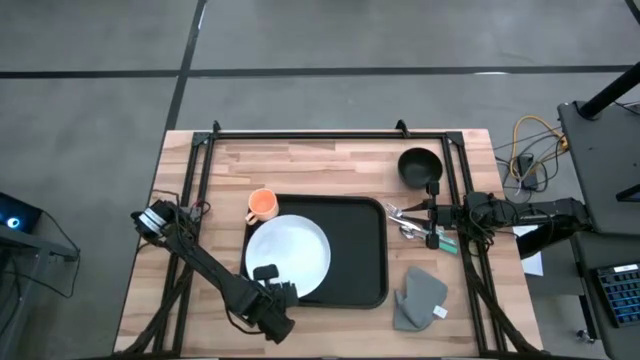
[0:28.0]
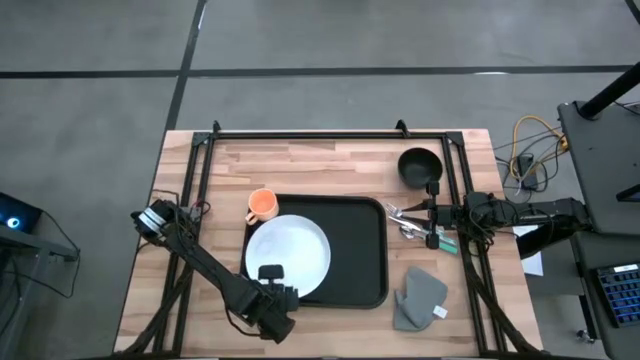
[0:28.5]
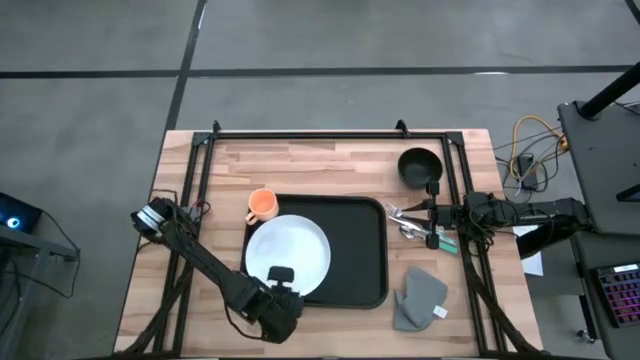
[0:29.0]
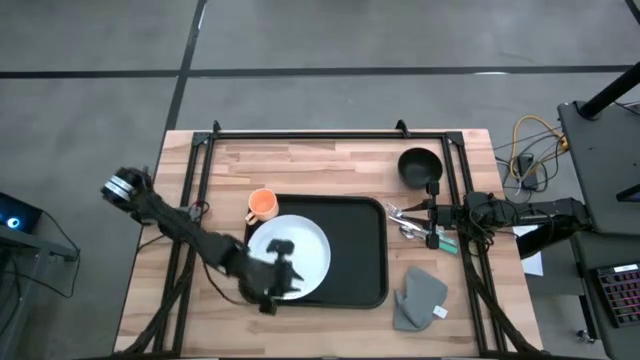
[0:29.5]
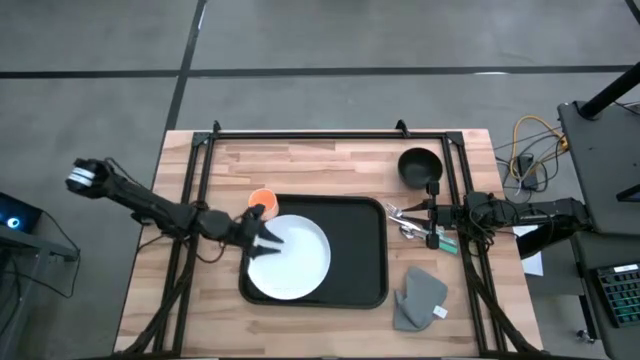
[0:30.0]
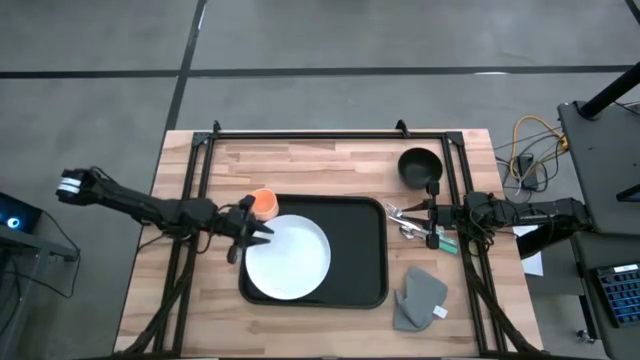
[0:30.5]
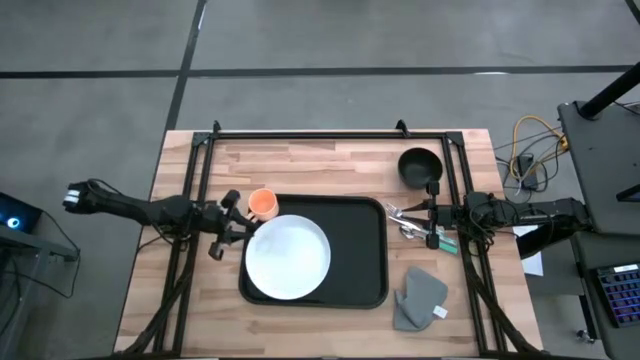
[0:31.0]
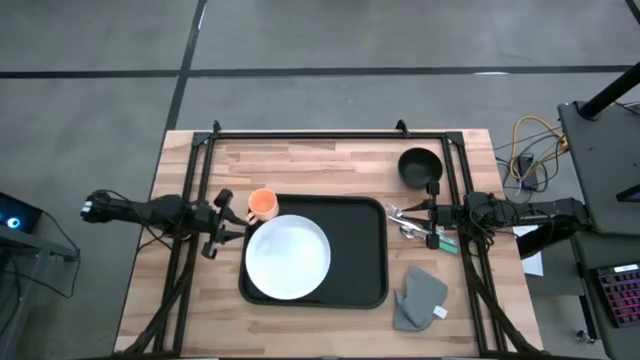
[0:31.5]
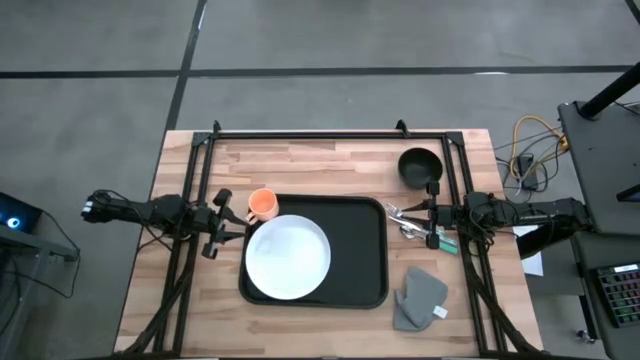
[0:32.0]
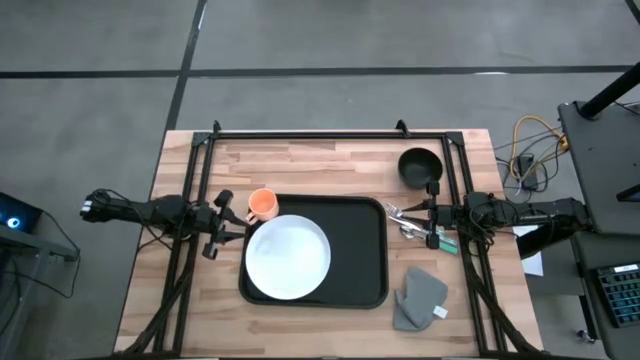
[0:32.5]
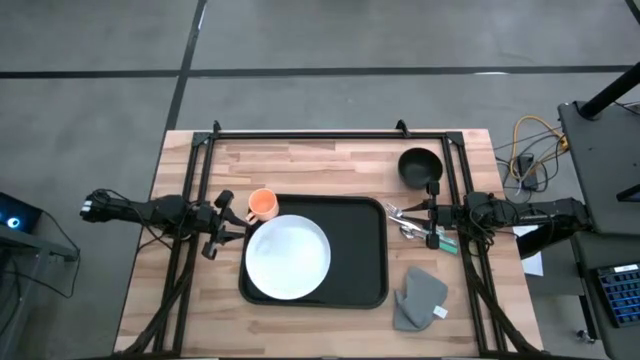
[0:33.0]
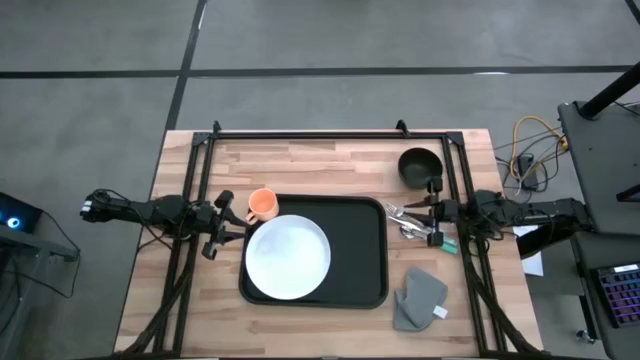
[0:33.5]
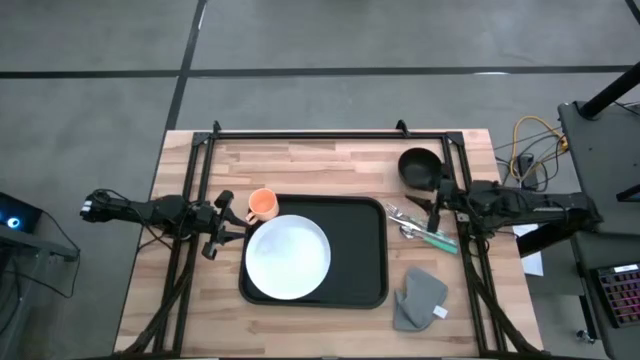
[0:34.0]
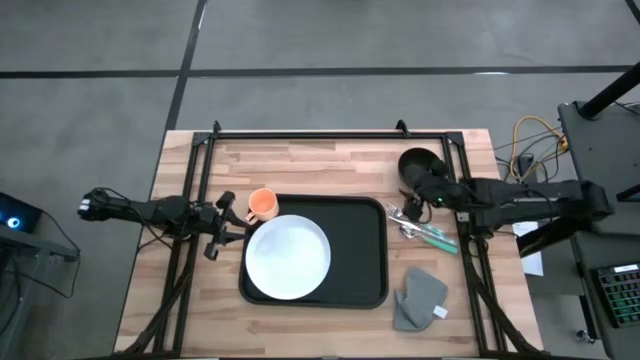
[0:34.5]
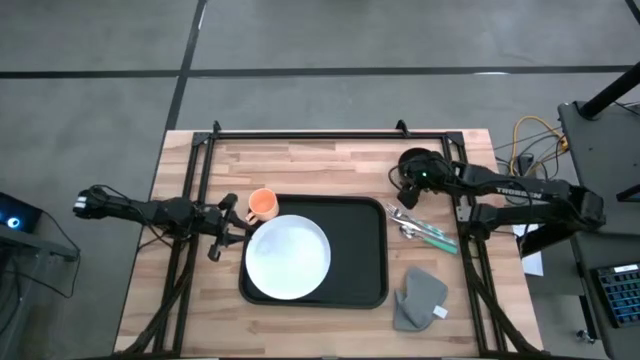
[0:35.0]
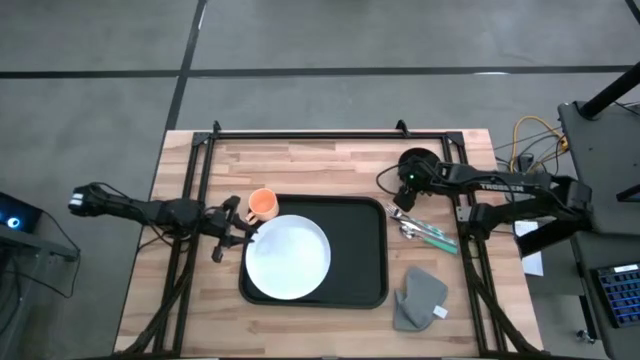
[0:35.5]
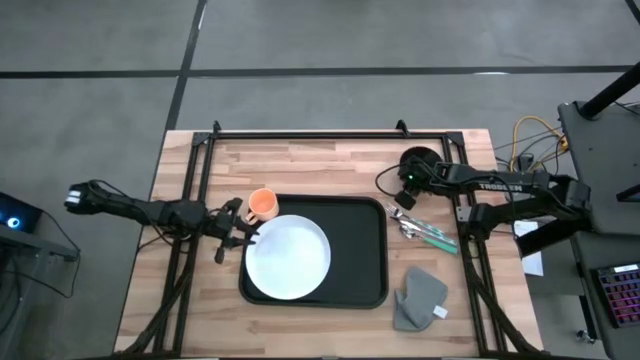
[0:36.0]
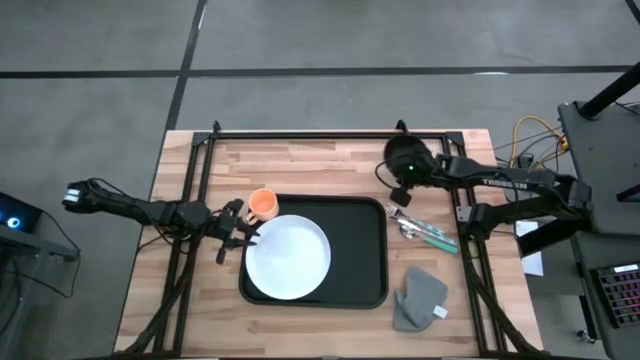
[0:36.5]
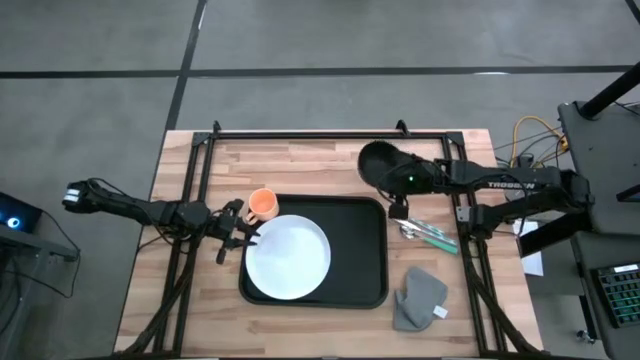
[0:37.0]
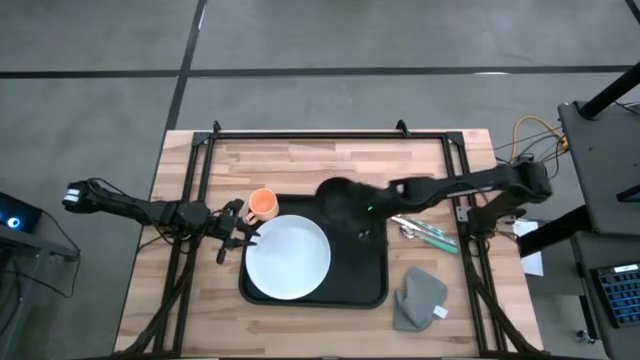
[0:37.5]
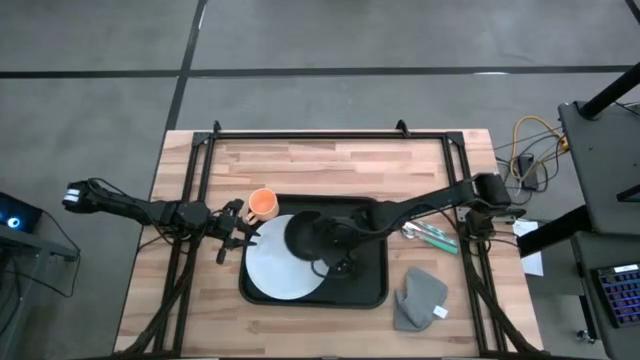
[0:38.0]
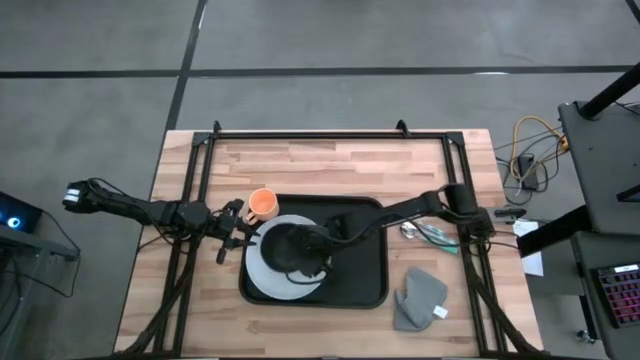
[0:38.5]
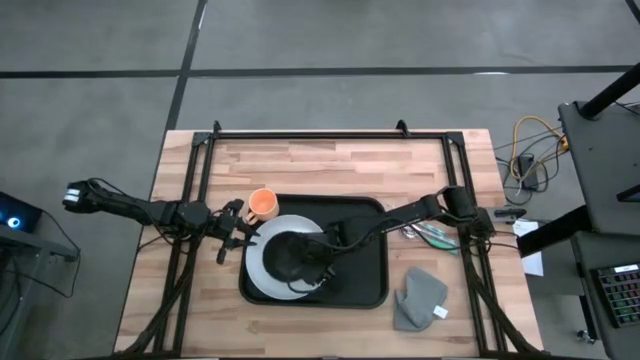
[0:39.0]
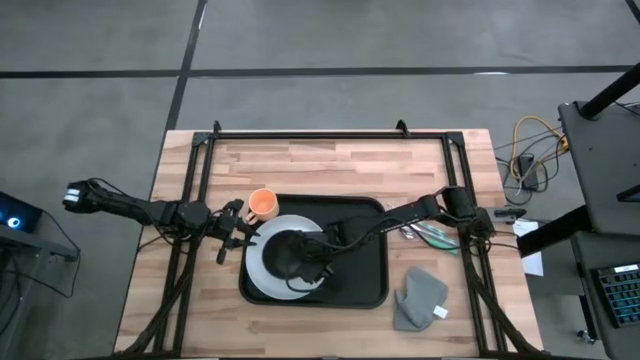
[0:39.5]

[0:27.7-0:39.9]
Task: Set up tray
Put the black bowl on top of the white plate

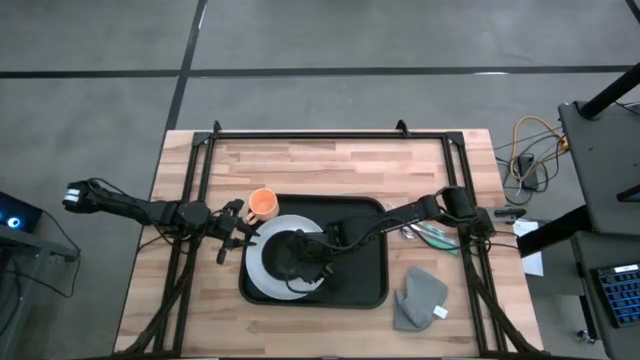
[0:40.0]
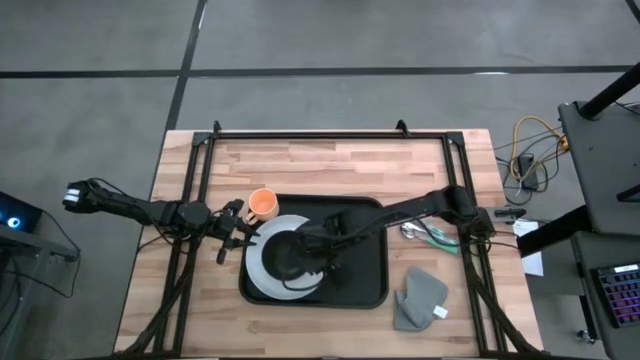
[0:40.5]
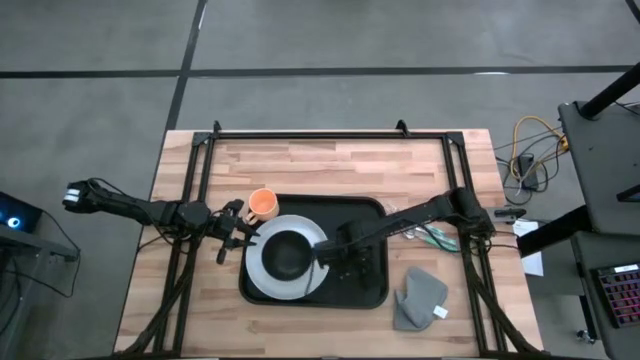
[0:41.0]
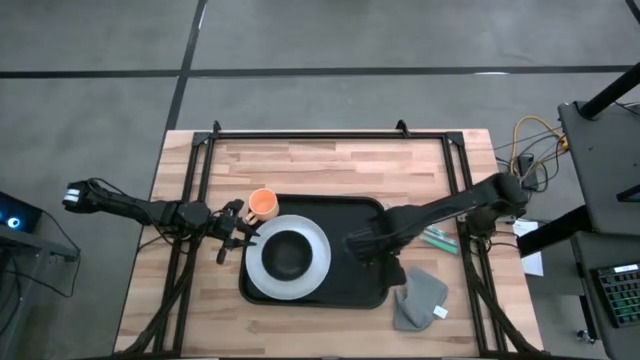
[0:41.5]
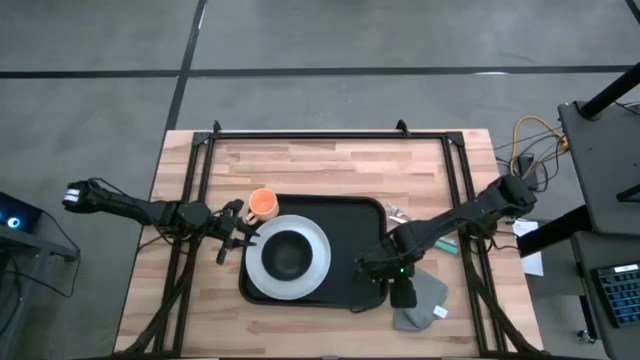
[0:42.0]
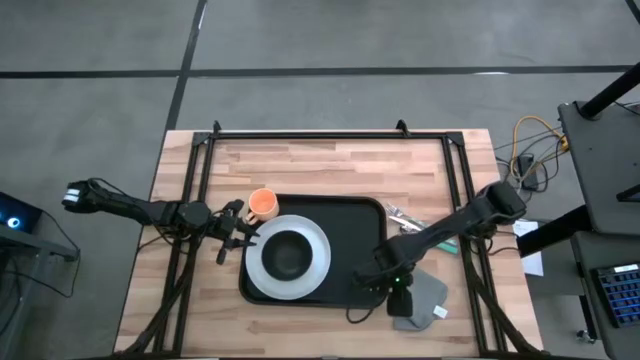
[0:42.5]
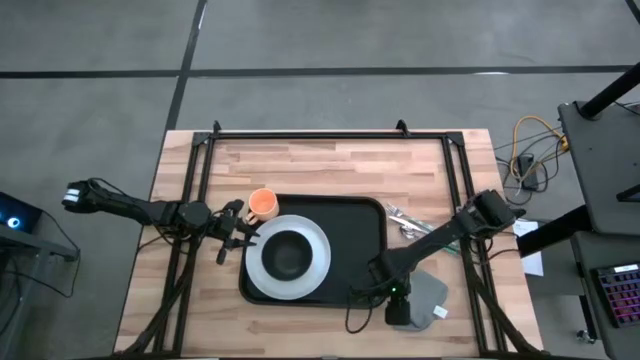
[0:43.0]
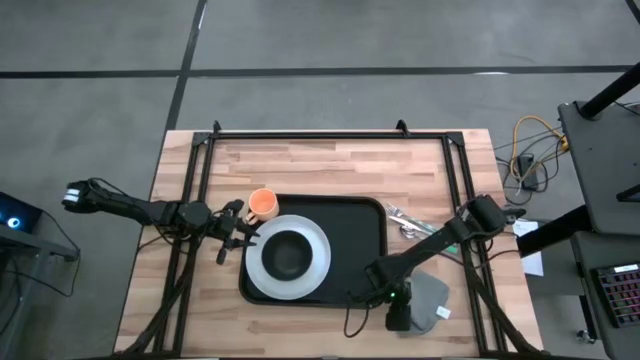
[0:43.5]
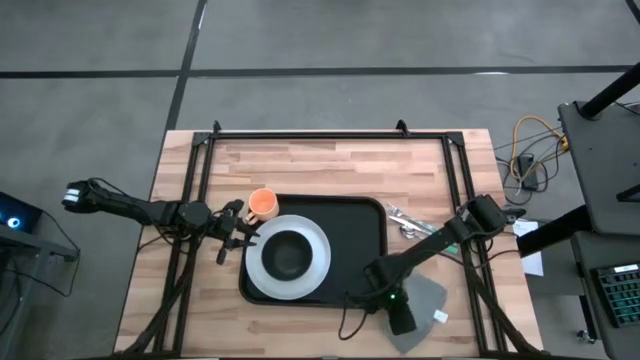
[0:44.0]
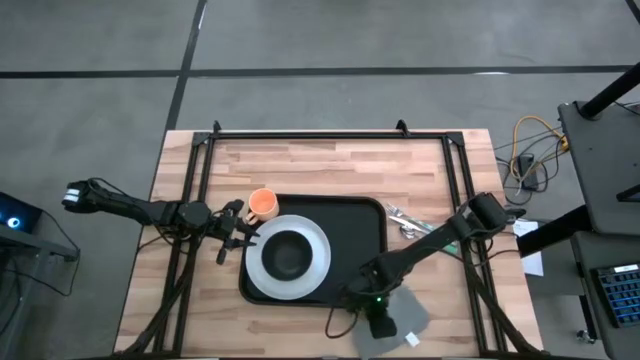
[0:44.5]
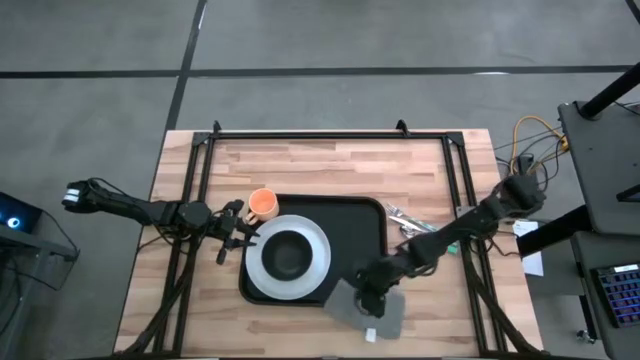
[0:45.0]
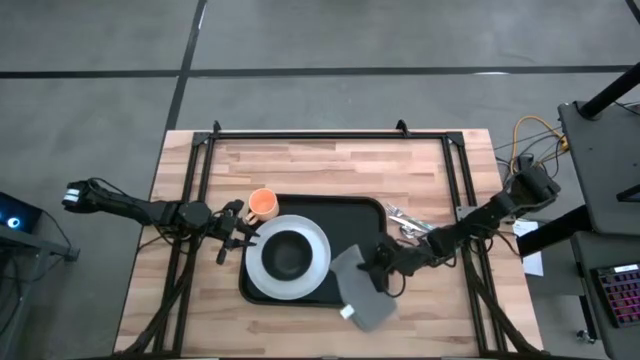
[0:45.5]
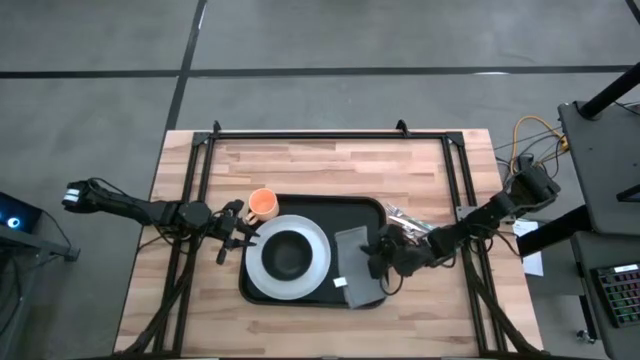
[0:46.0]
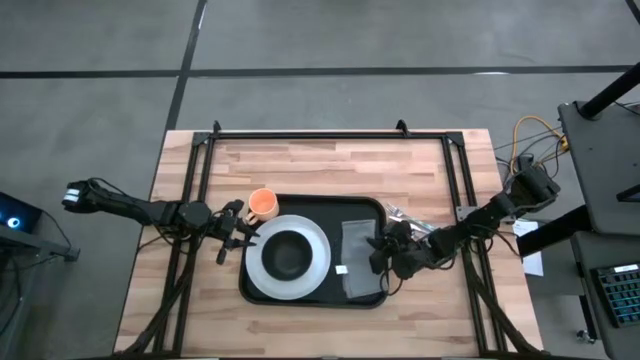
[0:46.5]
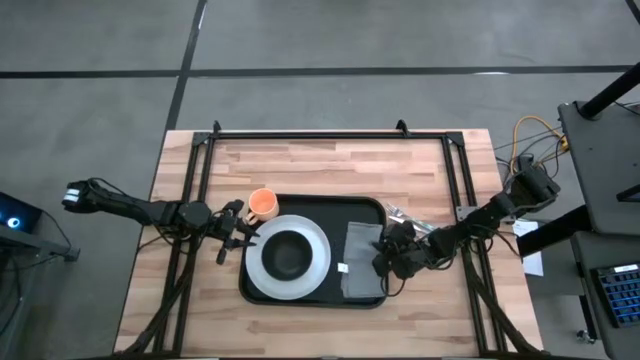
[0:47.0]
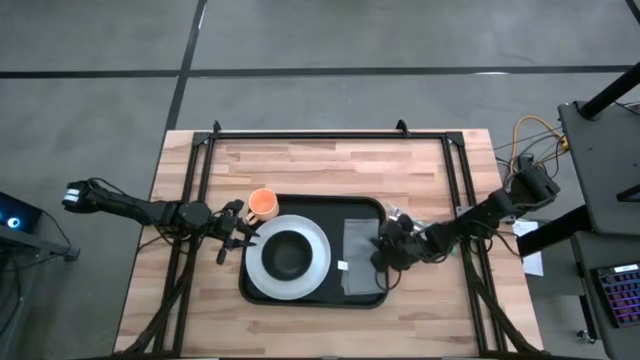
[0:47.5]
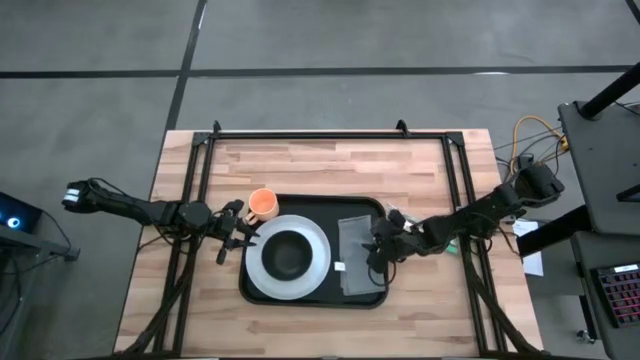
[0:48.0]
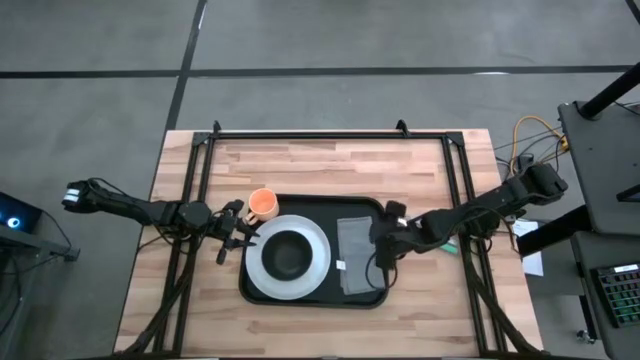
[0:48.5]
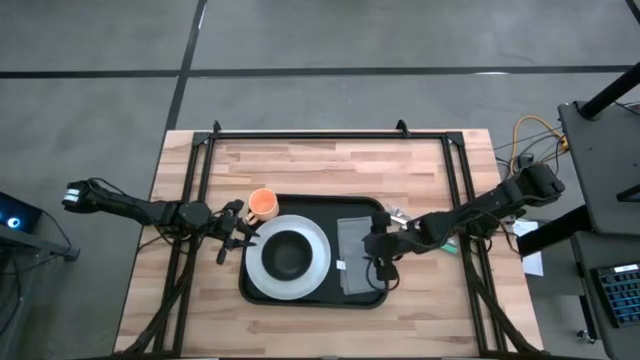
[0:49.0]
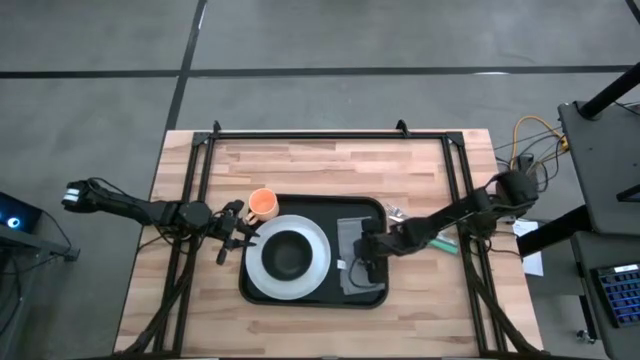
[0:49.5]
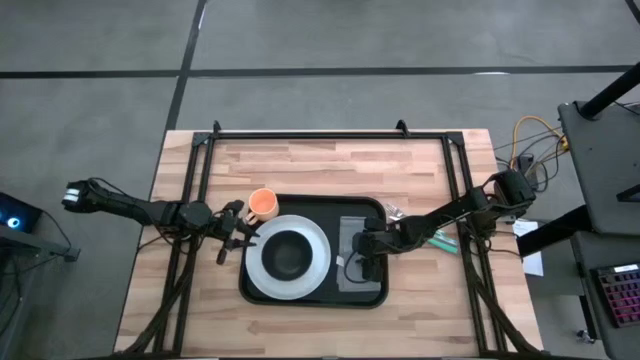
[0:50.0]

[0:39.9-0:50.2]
Put the gray napkin on the black serving tray to the right of the white plate
